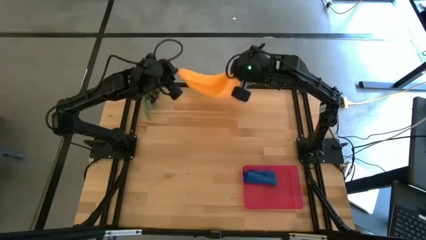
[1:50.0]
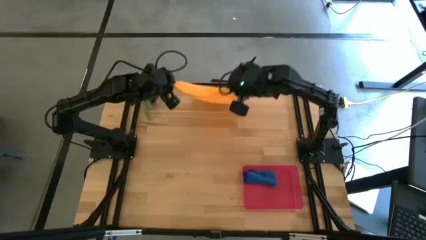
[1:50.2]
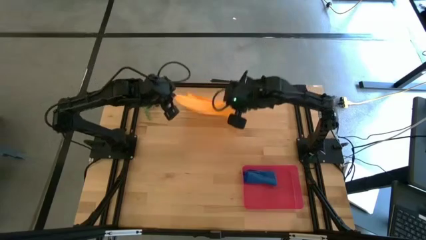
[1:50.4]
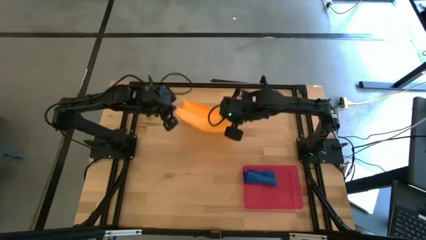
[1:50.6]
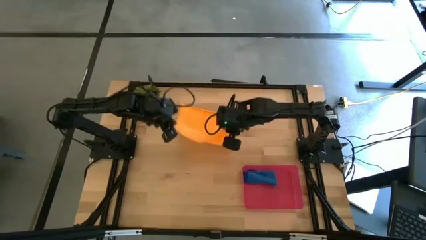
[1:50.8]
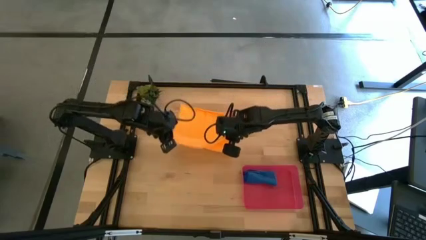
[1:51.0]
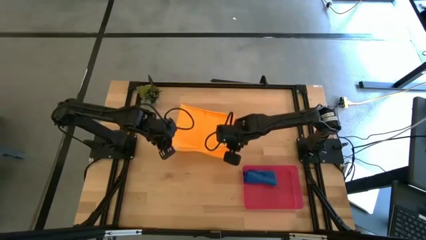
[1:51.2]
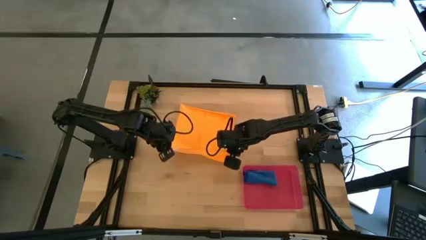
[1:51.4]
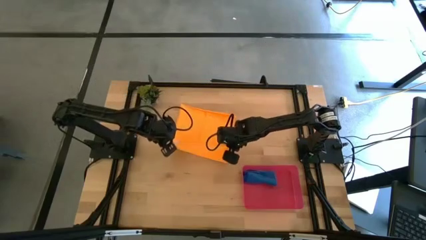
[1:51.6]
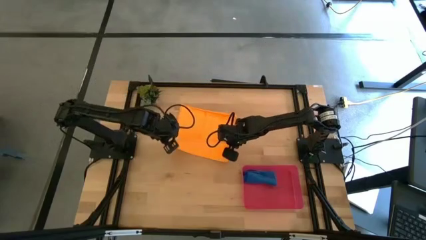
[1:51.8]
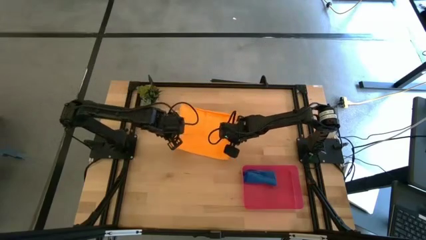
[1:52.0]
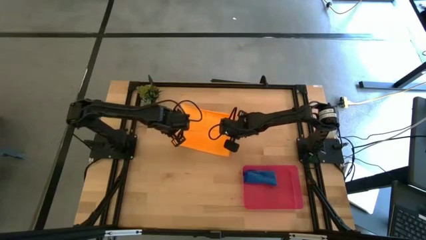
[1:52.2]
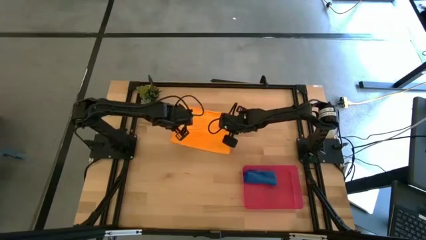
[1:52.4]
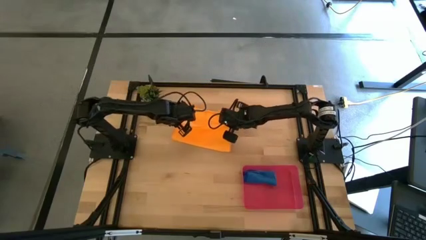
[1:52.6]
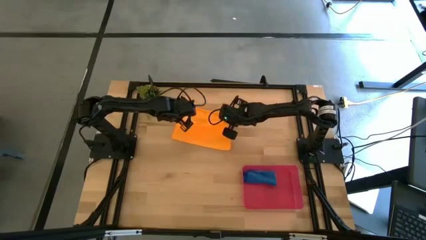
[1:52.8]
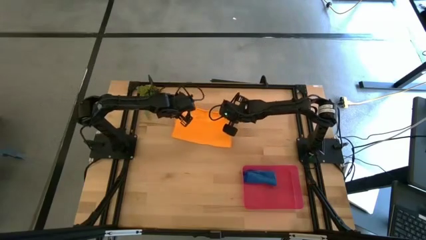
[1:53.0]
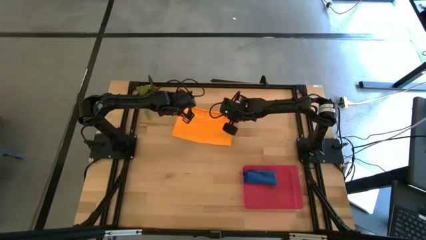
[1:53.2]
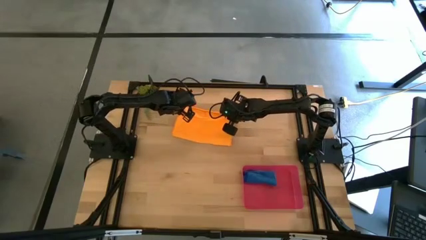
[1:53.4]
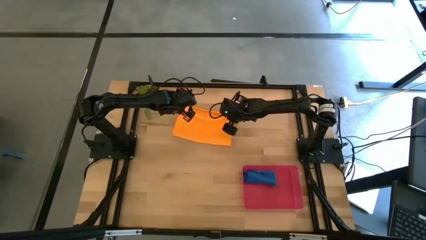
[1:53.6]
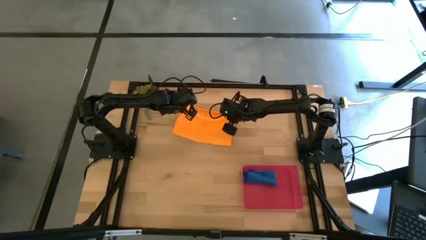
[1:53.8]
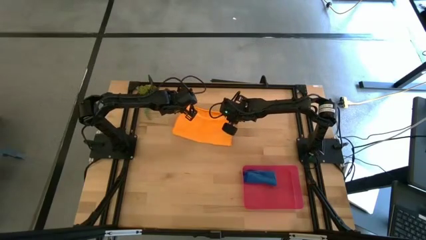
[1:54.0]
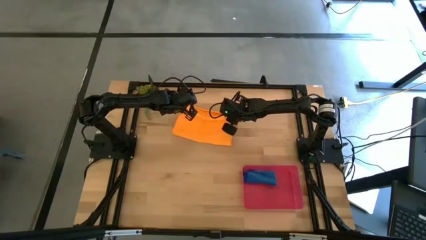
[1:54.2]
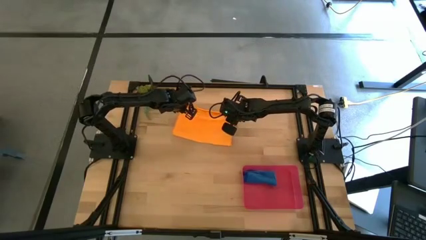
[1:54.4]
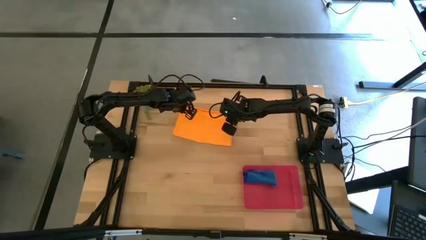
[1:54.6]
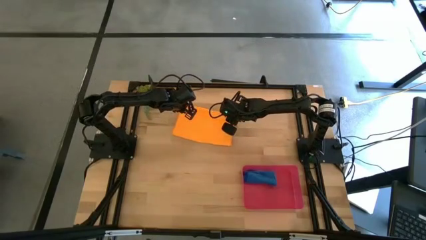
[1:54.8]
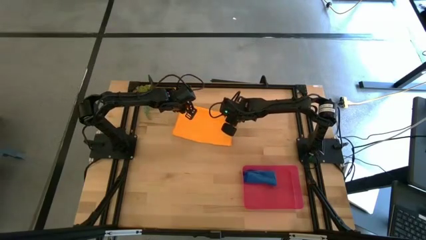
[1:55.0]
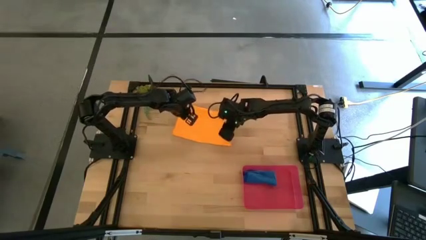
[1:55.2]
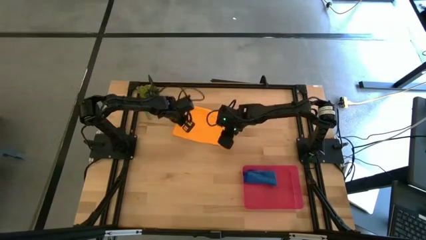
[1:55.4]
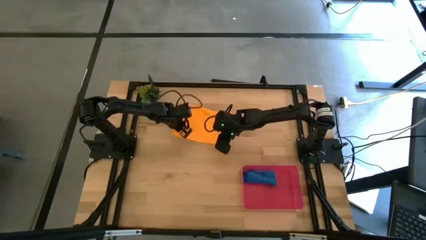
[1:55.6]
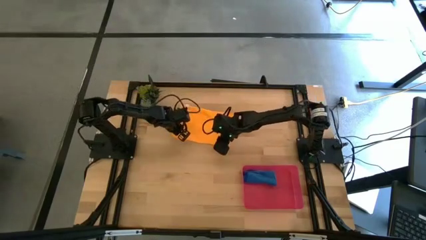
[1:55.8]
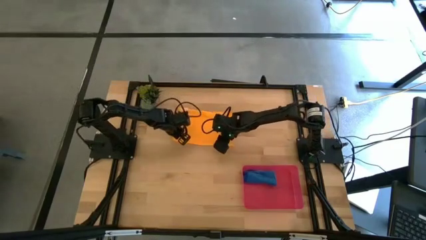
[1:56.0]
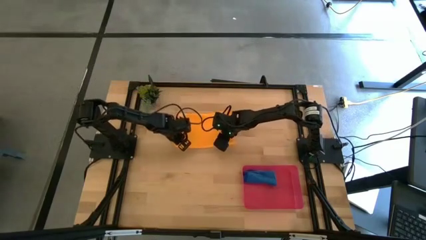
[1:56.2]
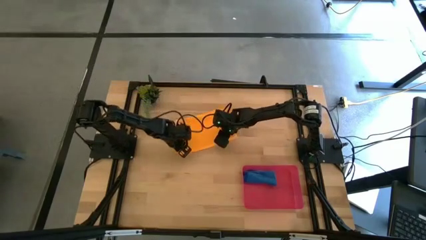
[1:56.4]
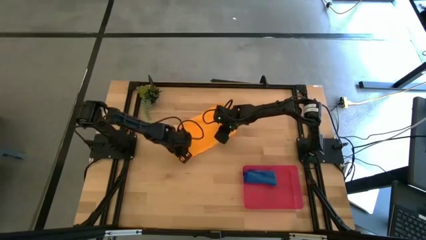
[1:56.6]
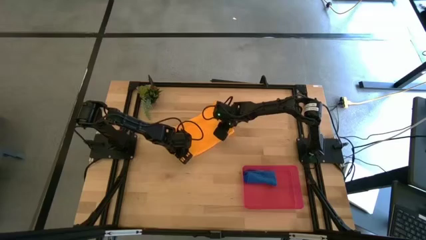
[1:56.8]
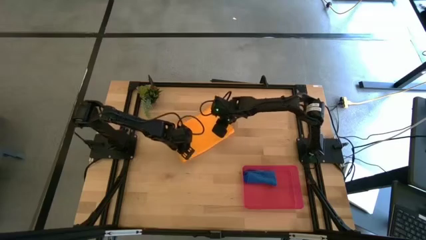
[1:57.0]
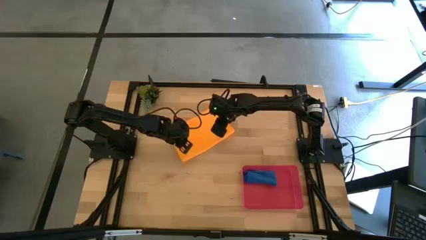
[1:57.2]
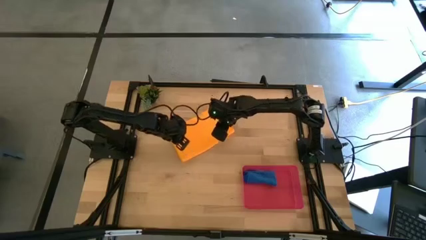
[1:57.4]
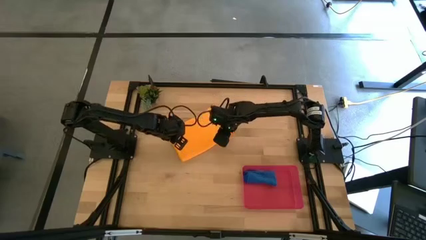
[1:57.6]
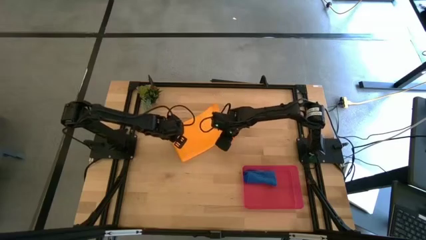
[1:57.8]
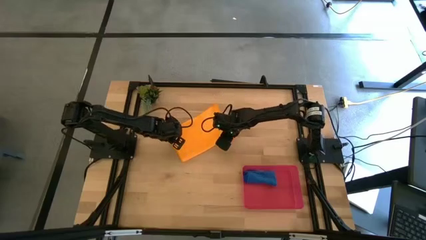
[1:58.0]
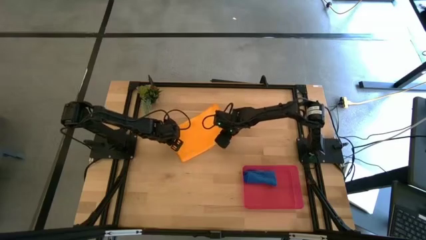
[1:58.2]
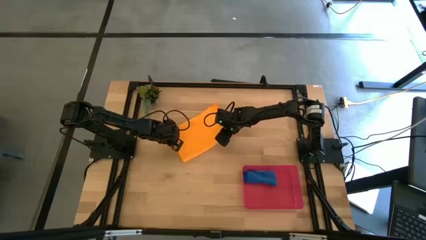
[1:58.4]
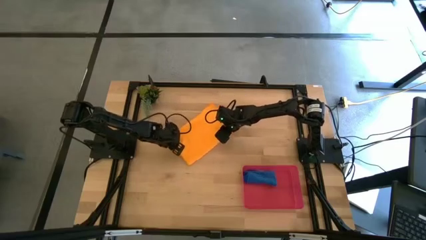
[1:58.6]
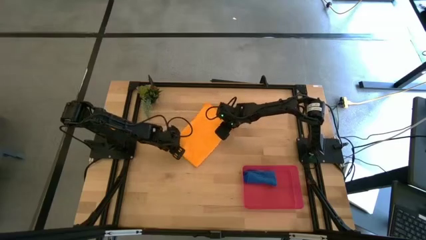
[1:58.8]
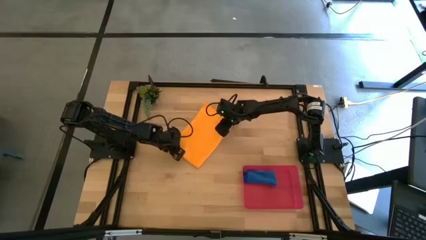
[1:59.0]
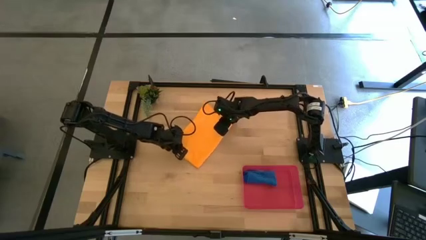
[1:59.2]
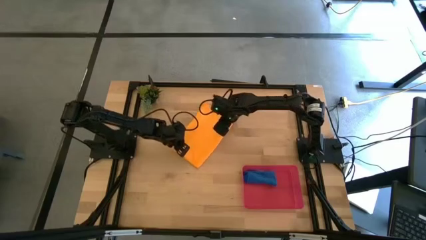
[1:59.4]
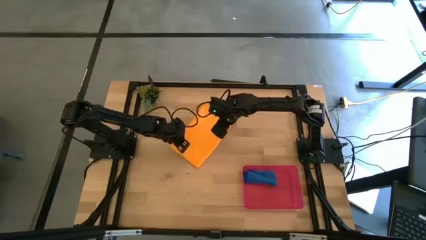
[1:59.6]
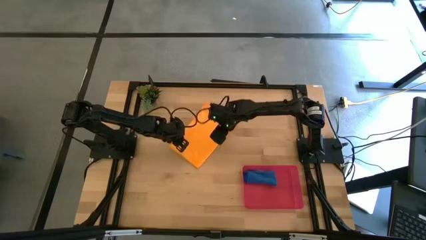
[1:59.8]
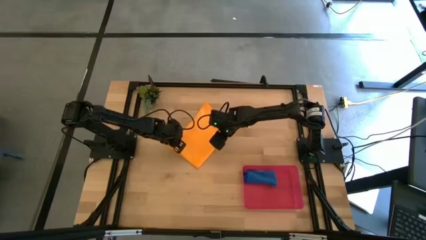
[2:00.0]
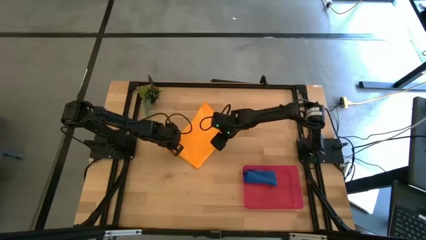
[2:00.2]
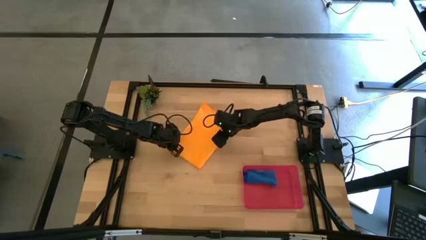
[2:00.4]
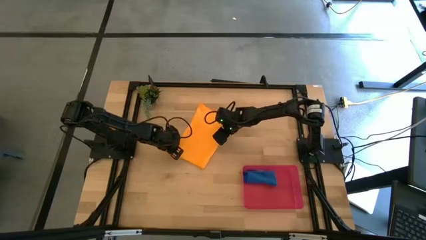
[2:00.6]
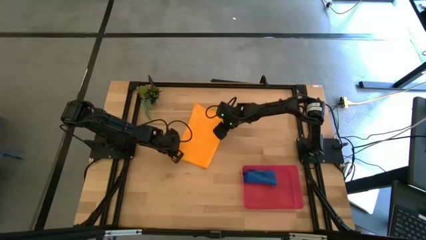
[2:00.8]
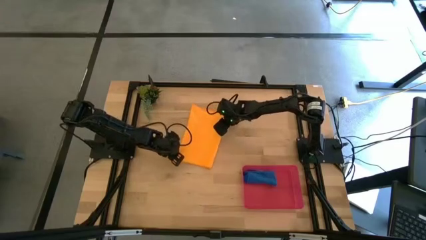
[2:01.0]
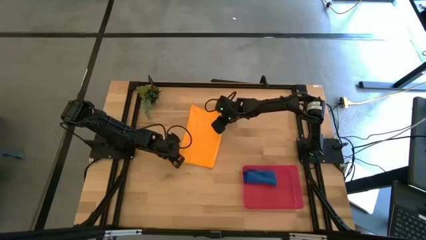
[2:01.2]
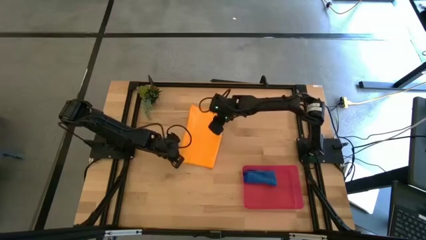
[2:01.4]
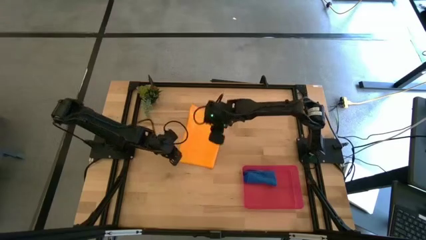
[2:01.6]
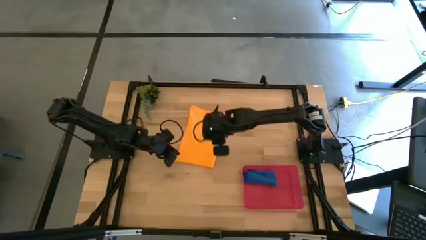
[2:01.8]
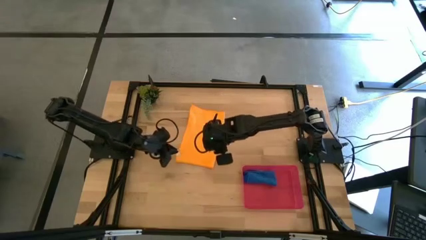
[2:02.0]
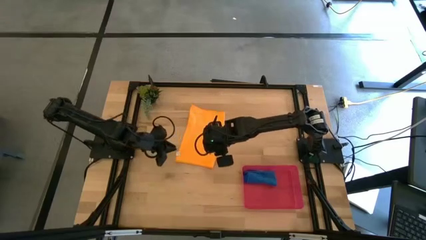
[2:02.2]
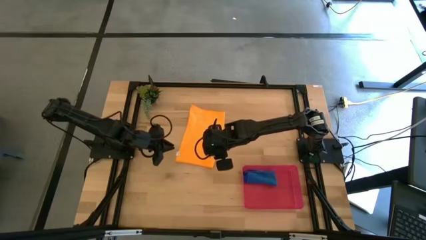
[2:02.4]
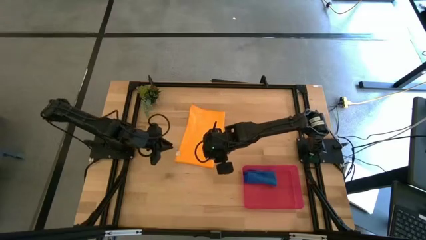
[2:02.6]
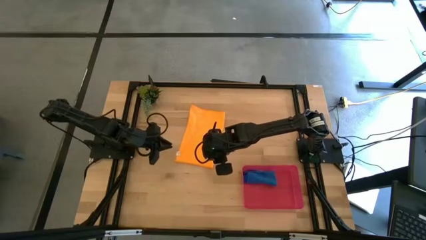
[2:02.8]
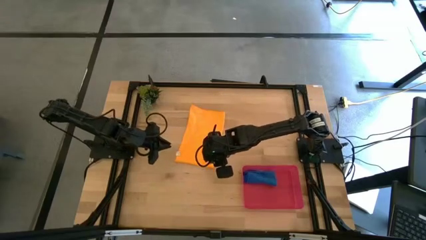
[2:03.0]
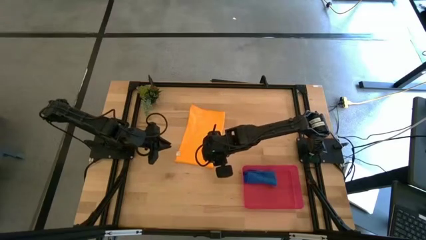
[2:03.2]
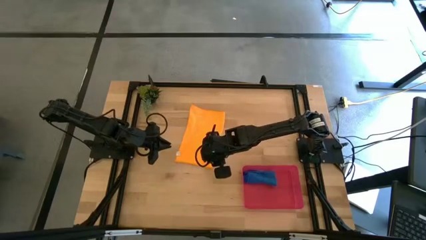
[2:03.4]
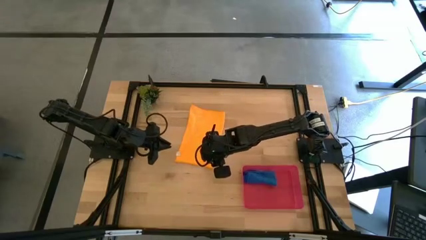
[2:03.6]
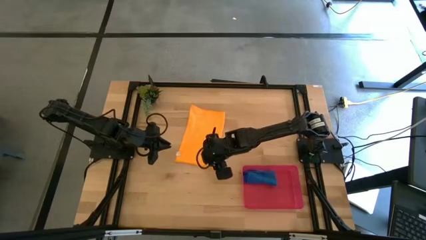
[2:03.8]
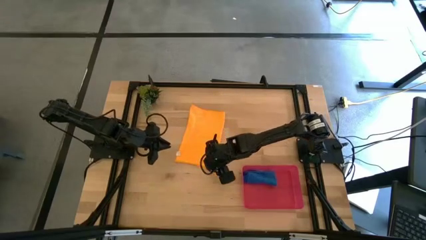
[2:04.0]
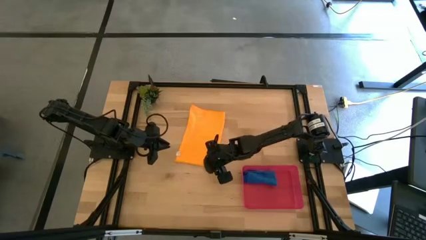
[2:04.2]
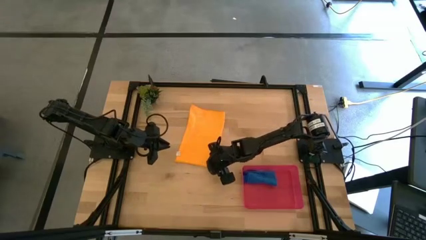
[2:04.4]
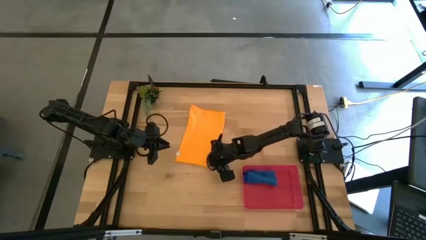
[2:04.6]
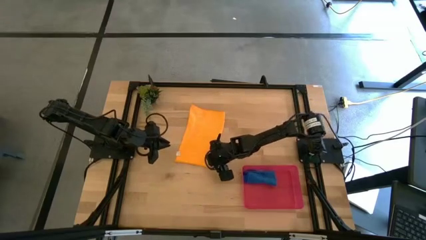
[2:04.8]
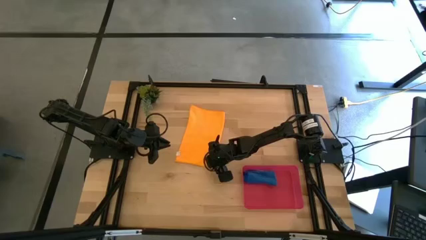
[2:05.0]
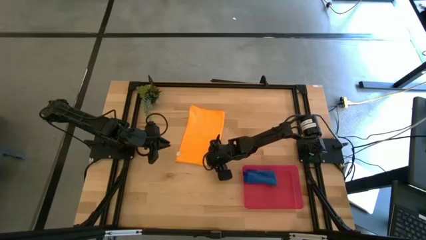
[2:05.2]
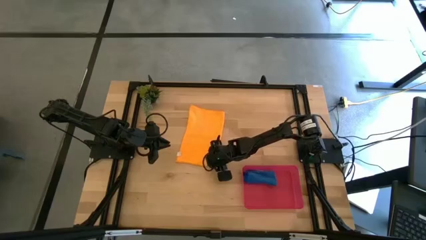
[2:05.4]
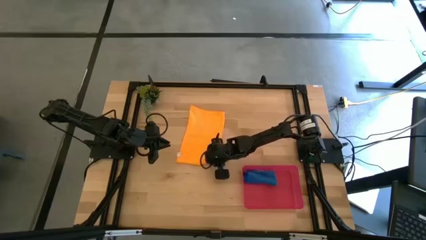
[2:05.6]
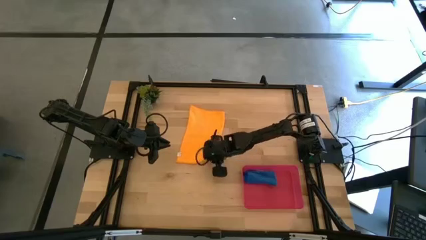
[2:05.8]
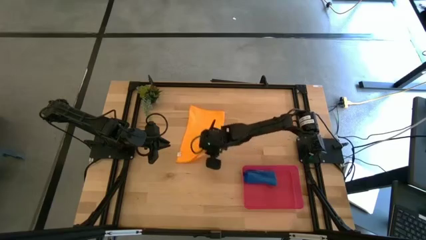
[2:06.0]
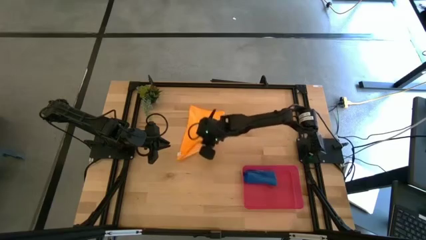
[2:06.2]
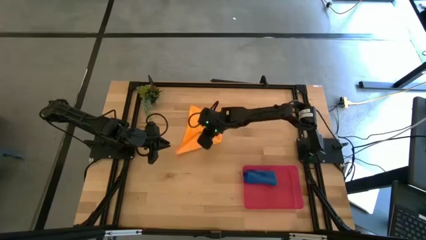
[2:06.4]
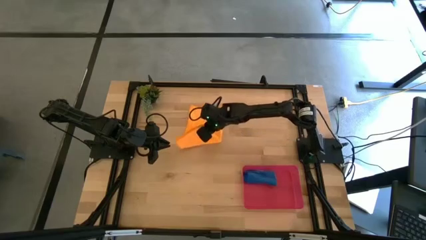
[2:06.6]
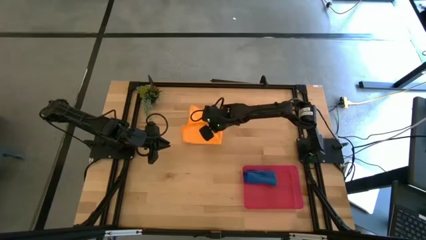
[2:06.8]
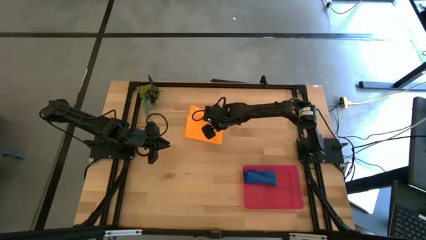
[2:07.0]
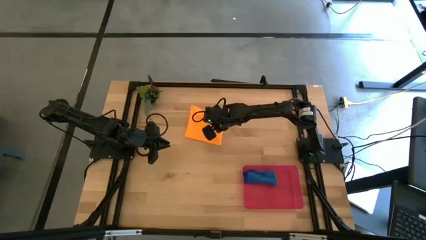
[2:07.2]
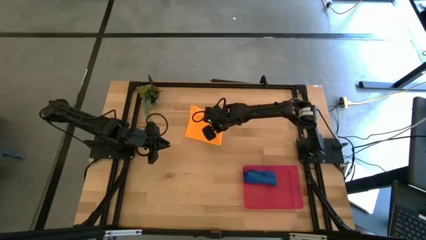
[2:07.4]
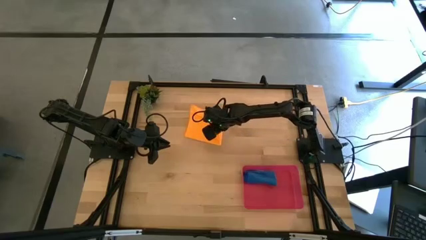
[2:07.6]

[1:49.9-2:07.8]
Task: Roll microfiber towels into tight, uniform cylinder then place into a basket
Fold the orange microfiber towel
